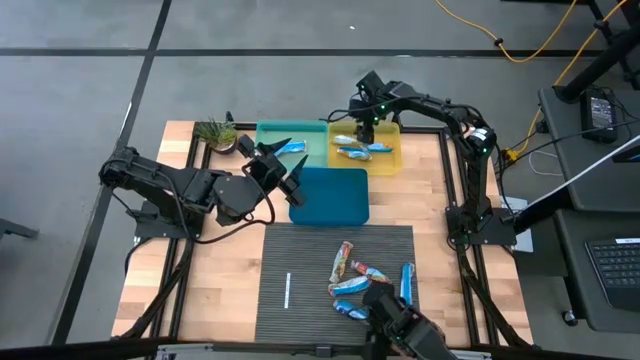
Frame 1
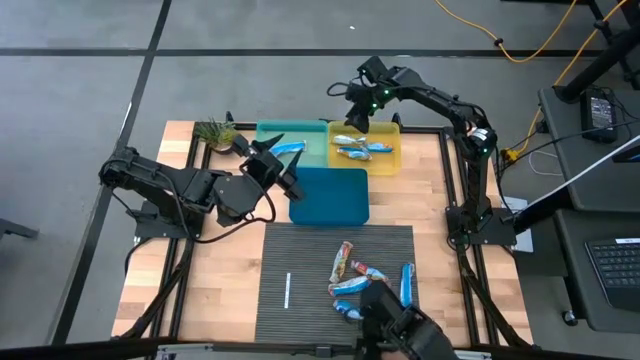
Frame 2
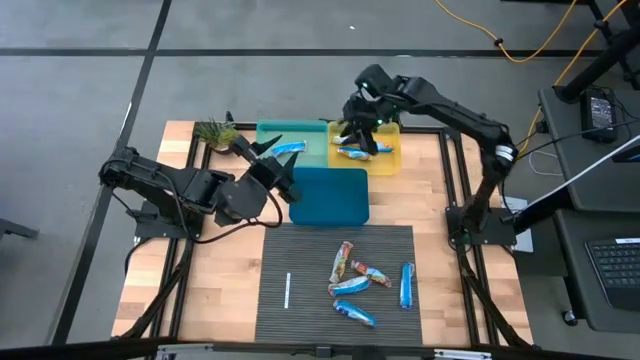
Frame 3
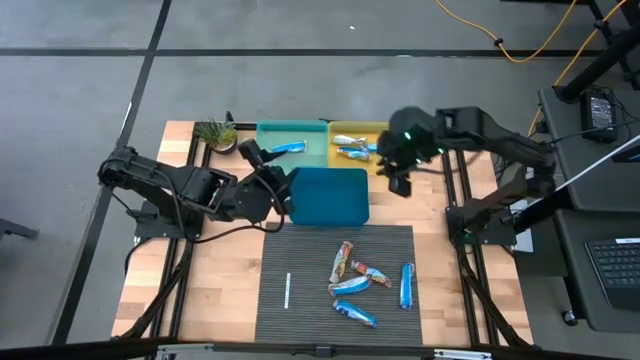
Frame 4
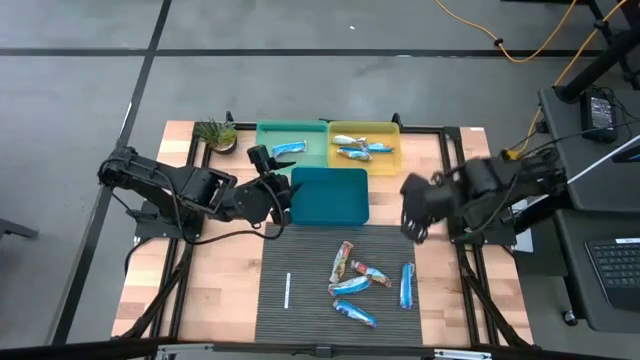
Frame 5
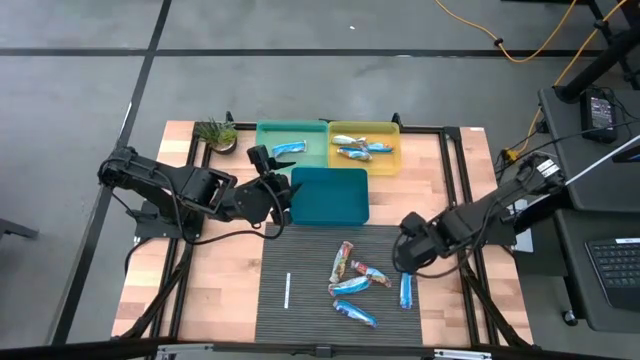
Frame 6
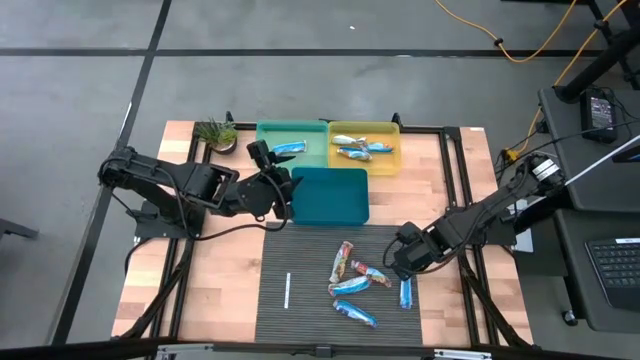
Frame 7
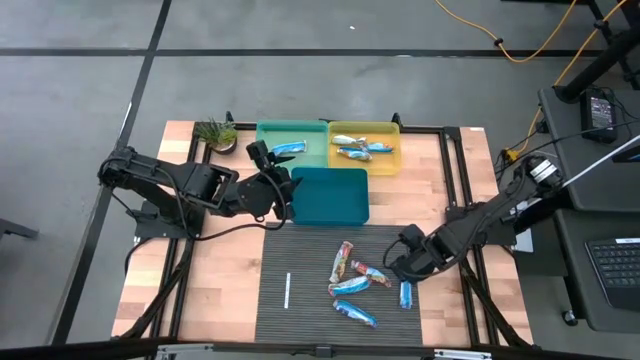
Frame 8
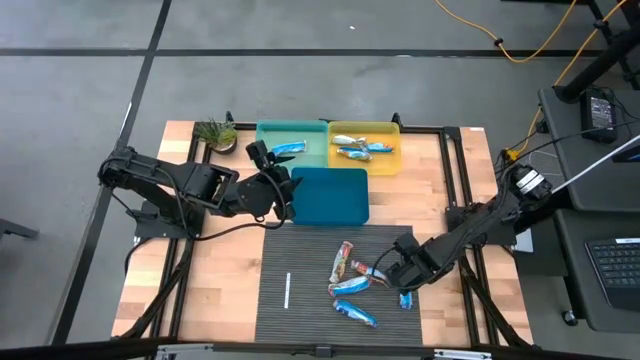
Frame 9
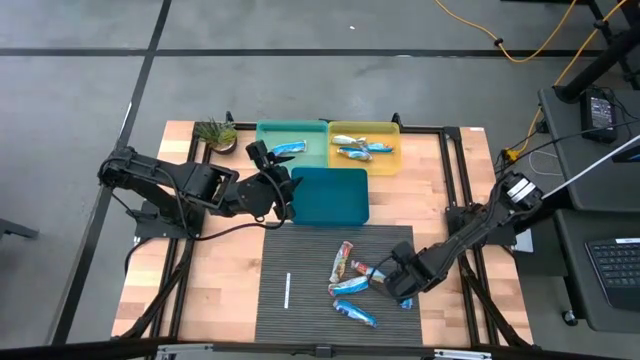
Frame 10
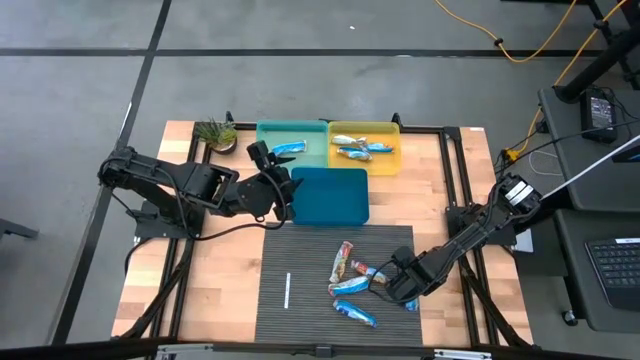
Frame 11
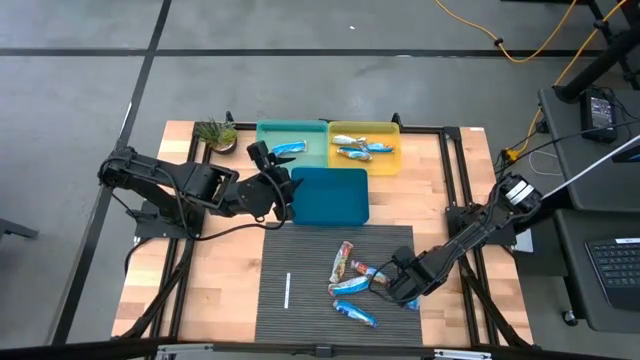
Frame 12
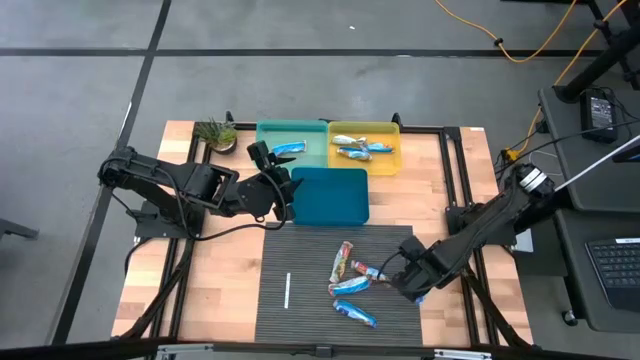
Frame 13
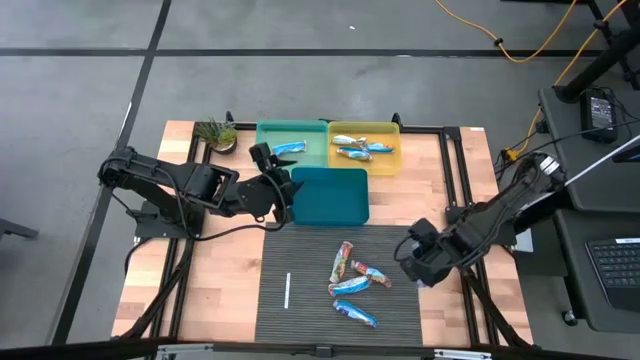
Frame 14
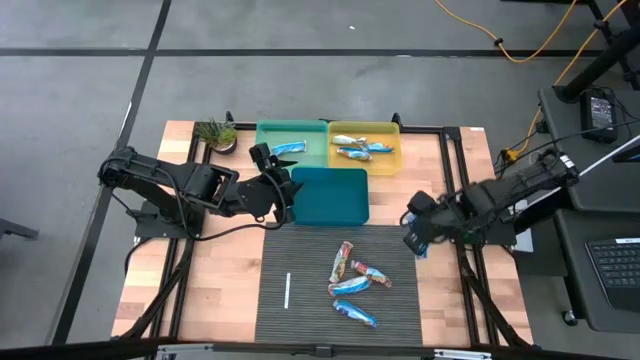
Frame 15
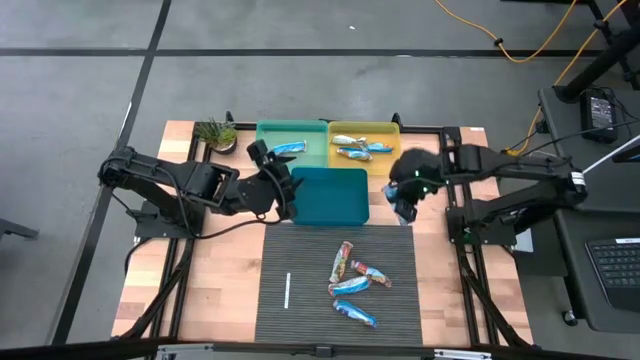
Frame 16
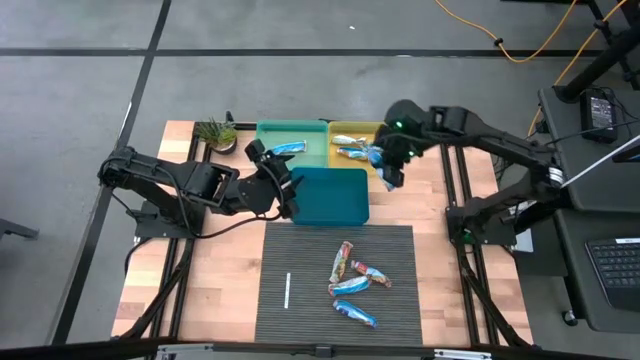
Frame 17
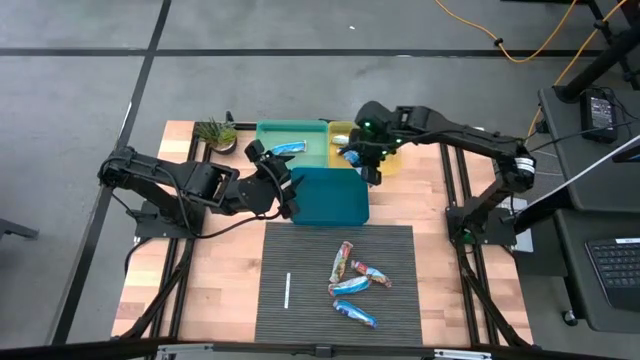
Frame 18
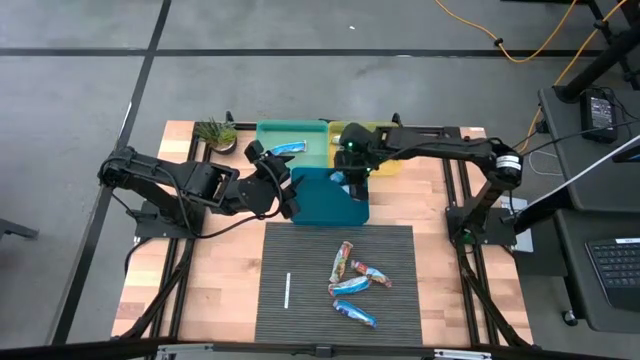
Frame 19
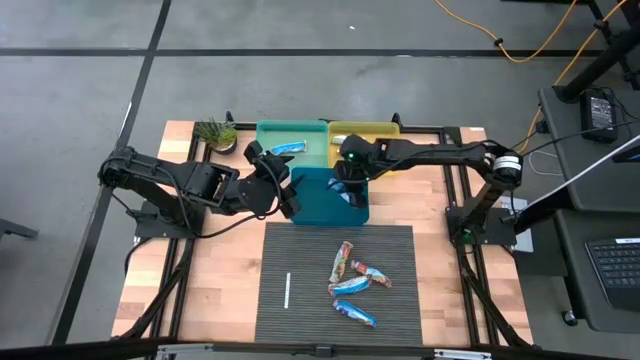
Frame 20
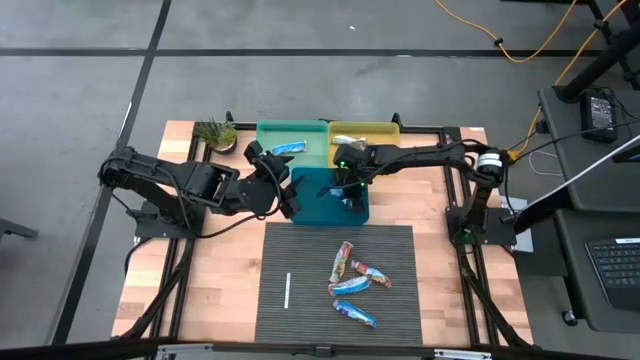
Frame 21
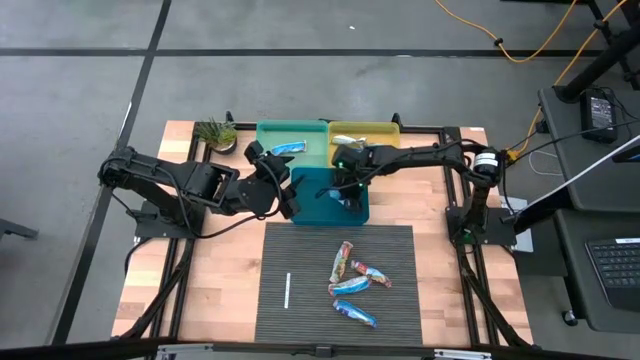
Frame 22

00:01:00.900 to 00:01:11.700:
Task: Pick and place Granola Bars by type
Put the blue granola bar into the blue bin

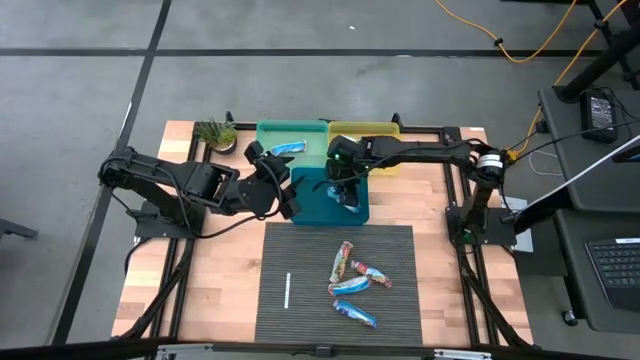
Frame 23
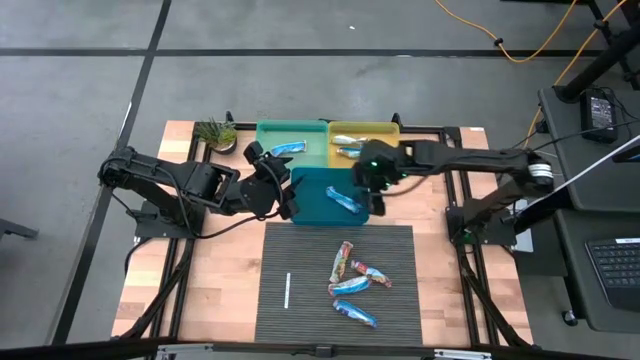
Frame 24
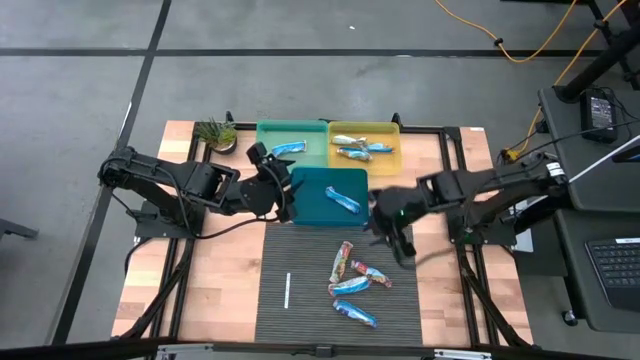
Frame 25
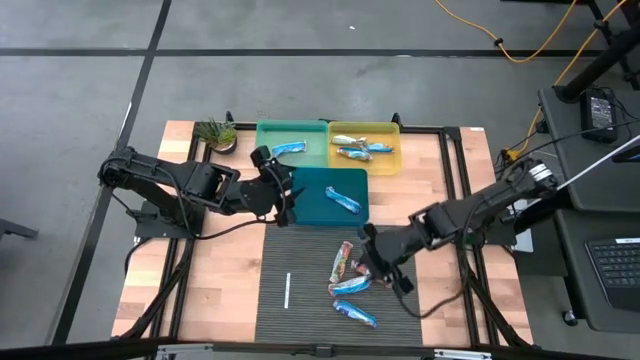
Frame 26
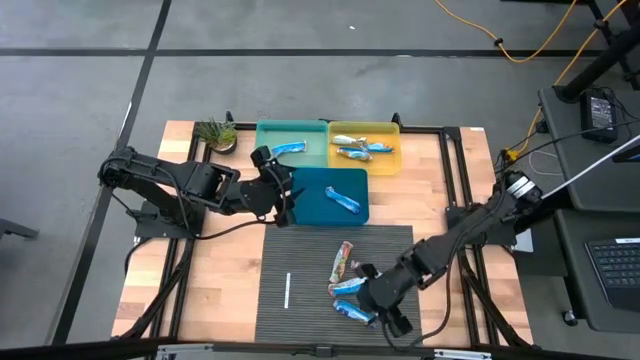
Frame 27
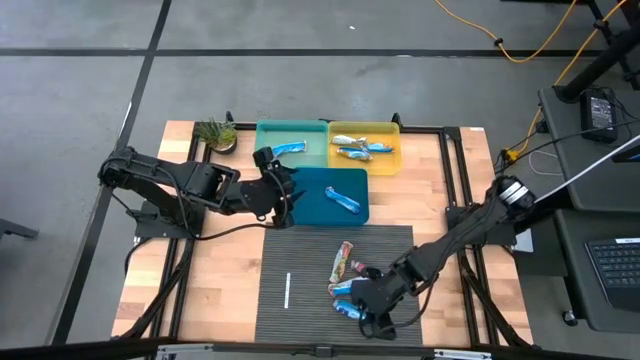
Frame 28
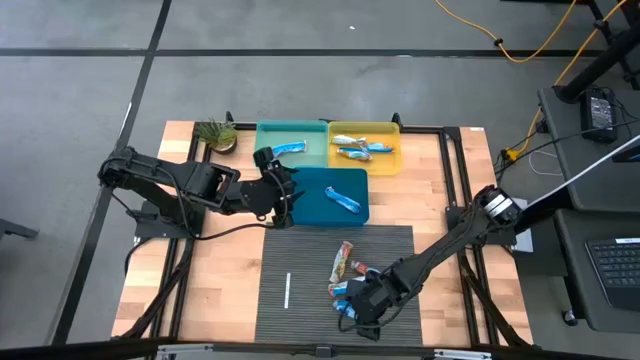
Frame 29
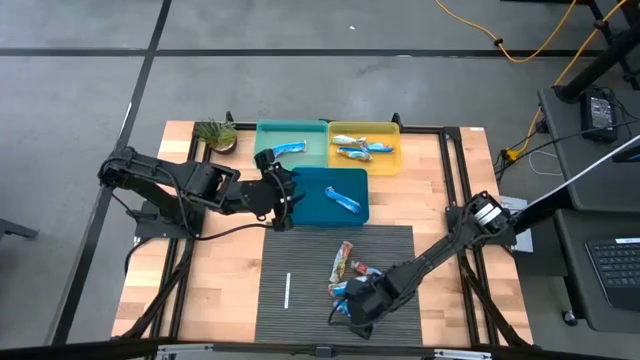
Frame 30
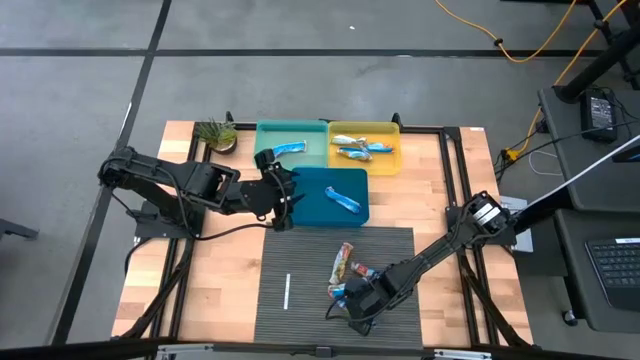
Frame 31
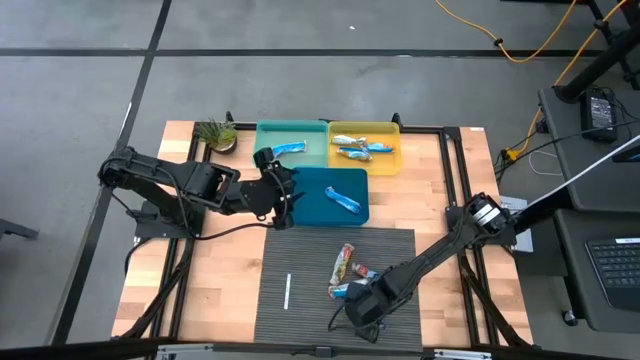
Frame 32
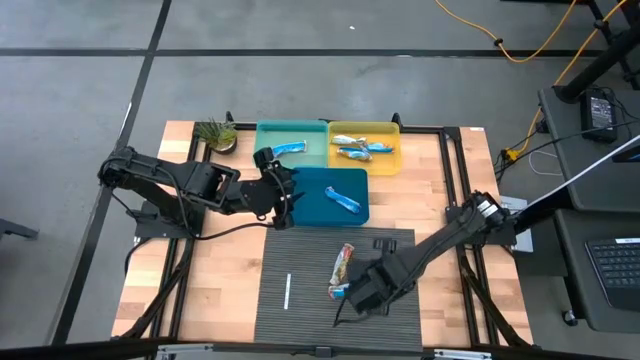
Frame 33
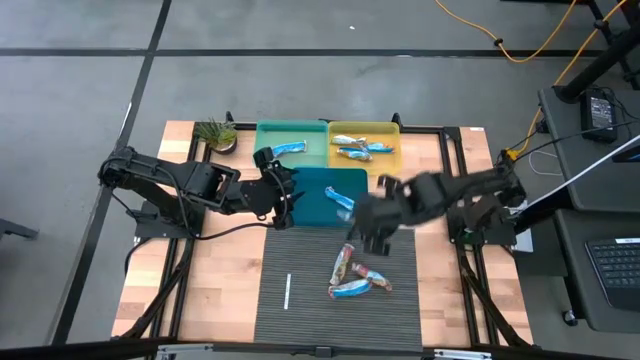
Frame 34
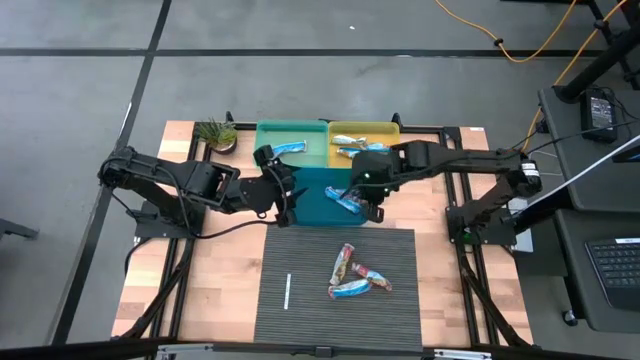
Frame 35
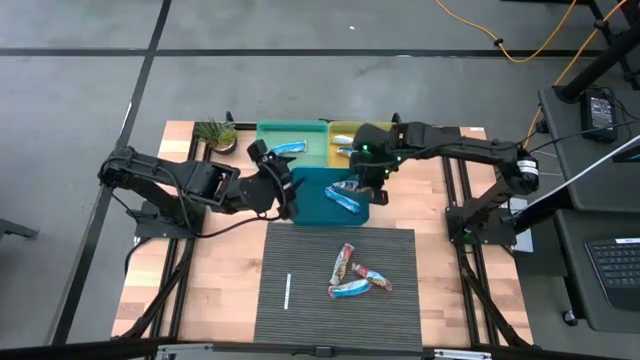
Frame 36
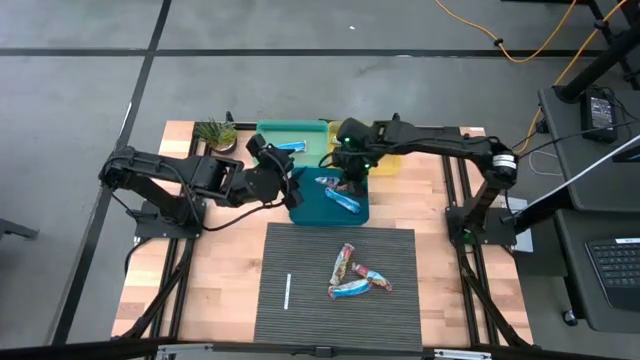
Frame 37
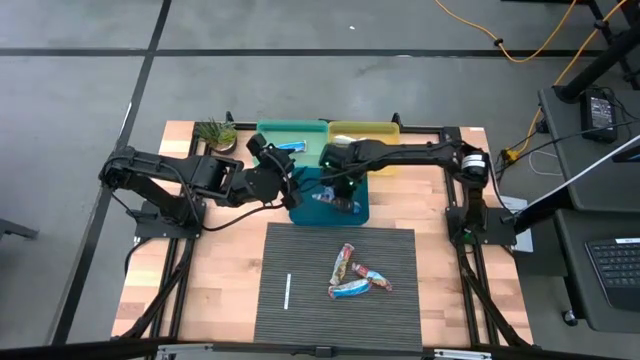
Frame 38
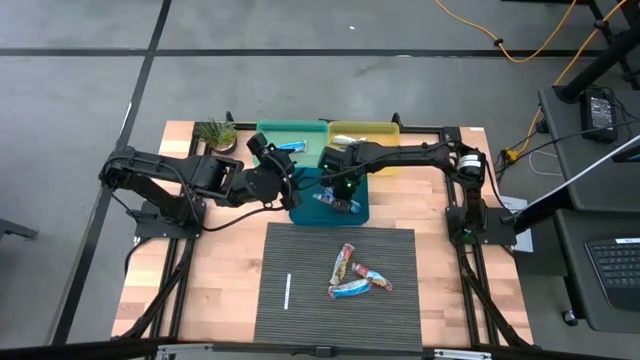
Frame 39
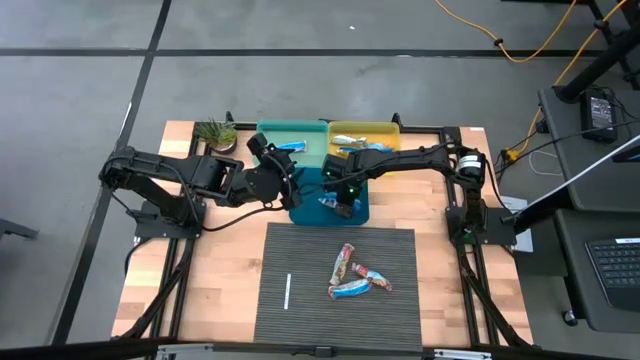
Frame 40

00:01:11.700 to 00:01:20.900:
Put the blue granola bar into the blue bin

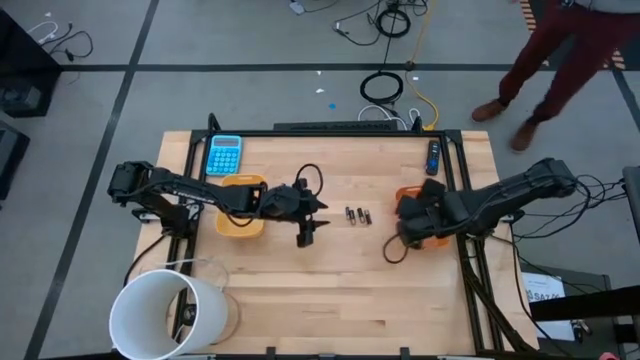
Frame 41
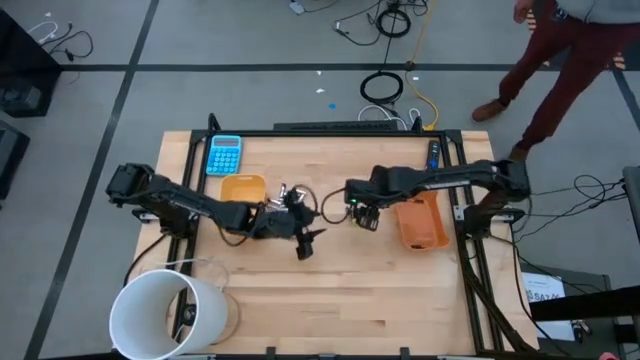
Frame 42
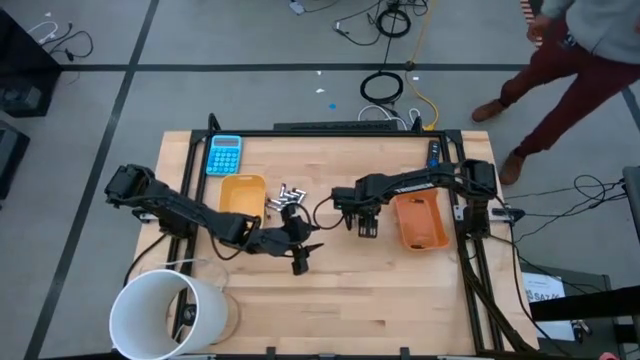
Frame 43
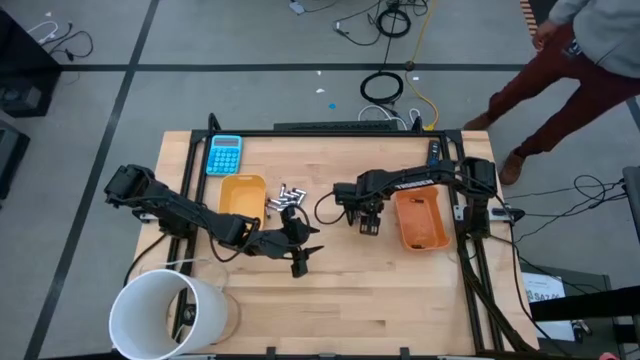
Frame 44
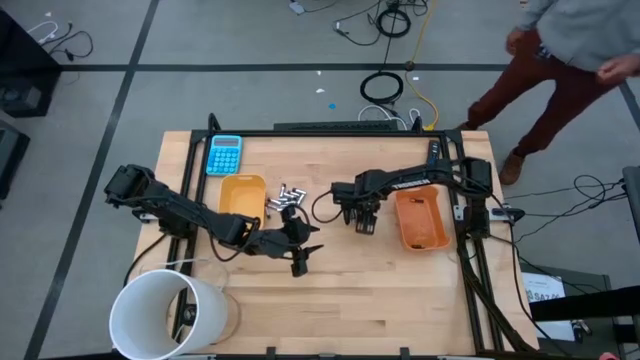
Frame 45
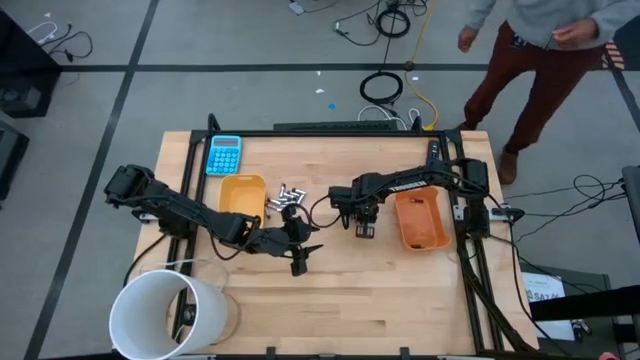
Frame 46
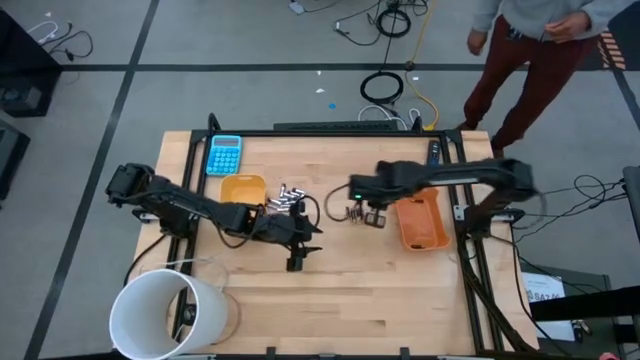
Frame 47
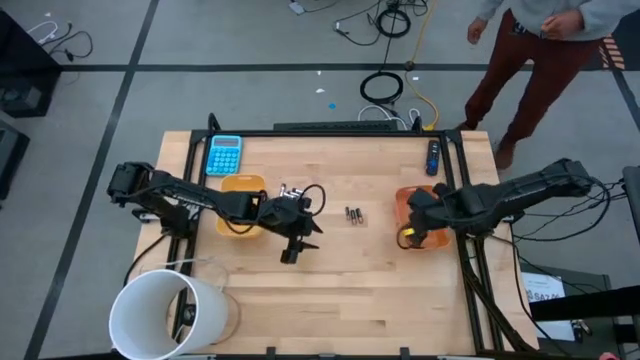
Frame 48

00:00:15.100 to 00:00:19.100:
Task: Sort batteries
Put the black battery into the orange bin
